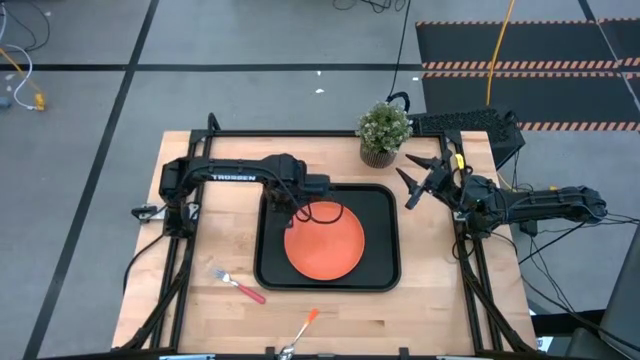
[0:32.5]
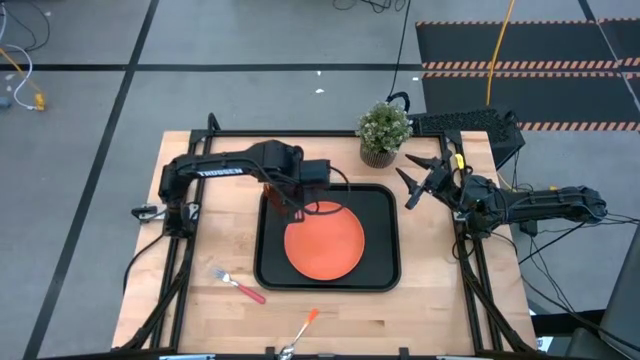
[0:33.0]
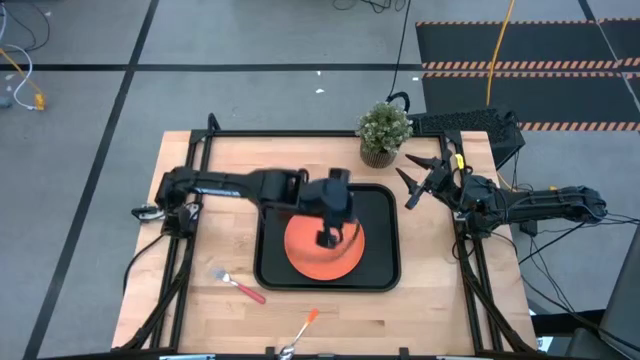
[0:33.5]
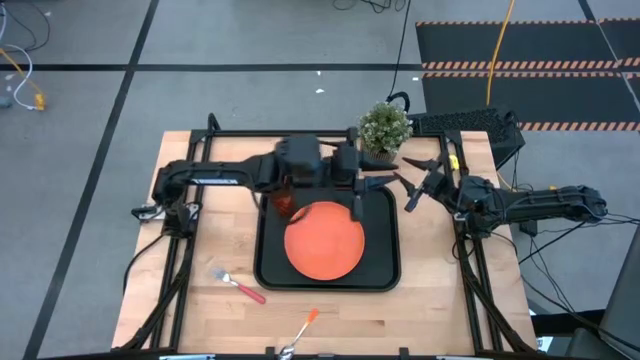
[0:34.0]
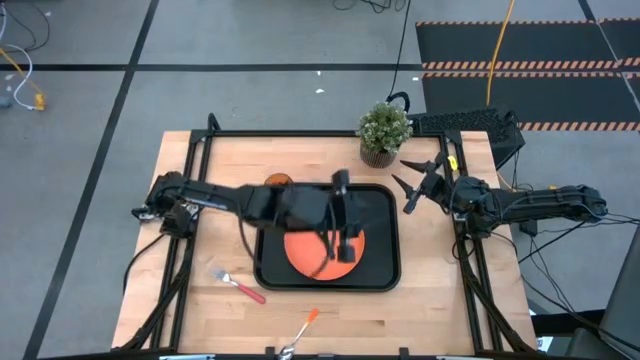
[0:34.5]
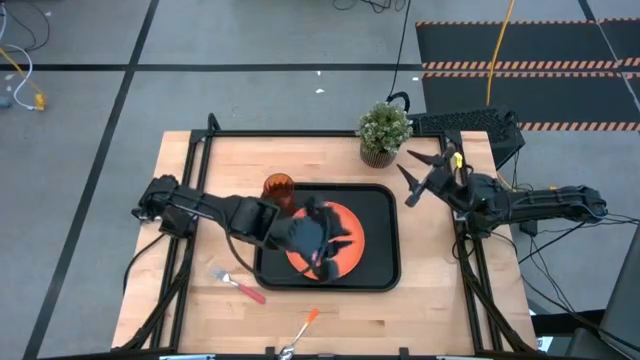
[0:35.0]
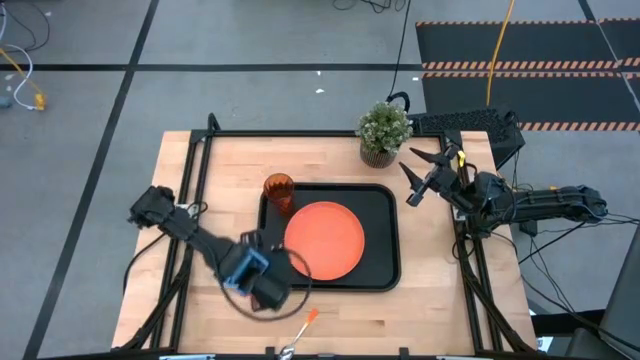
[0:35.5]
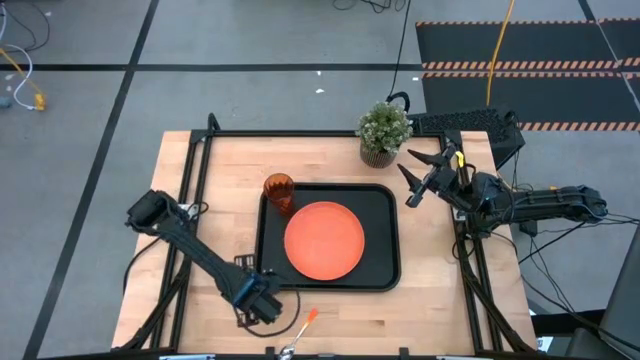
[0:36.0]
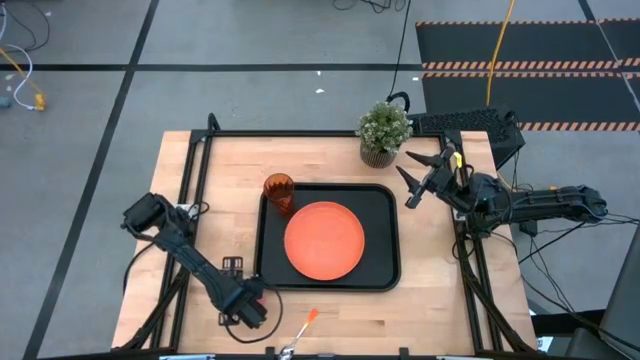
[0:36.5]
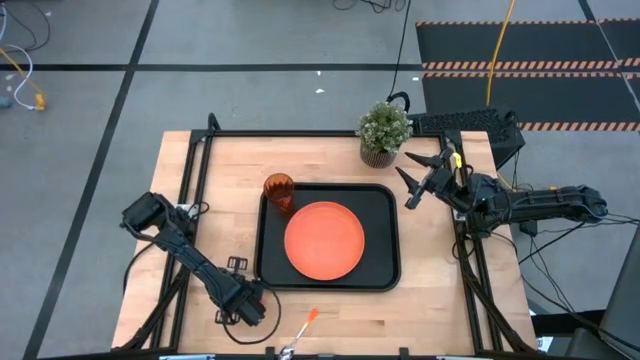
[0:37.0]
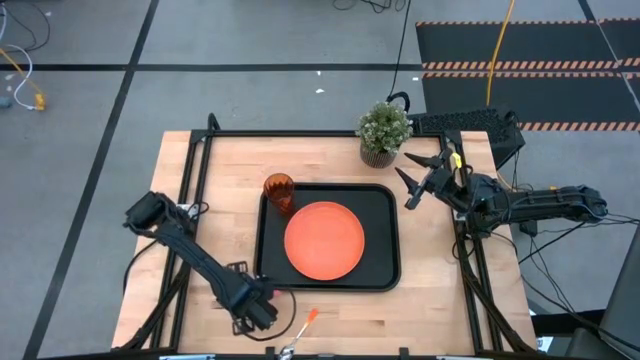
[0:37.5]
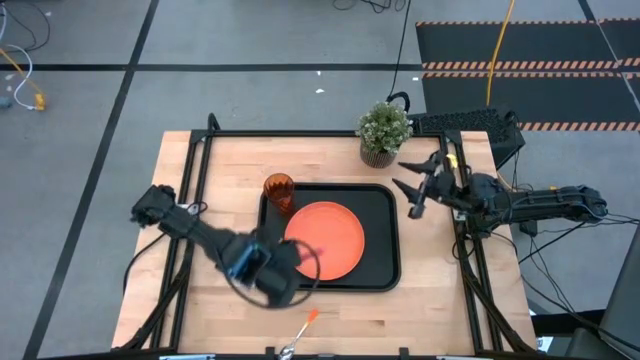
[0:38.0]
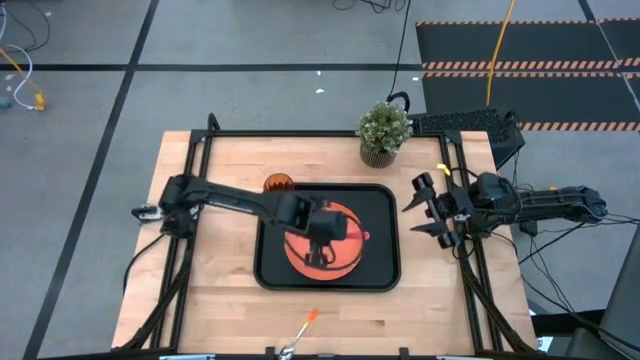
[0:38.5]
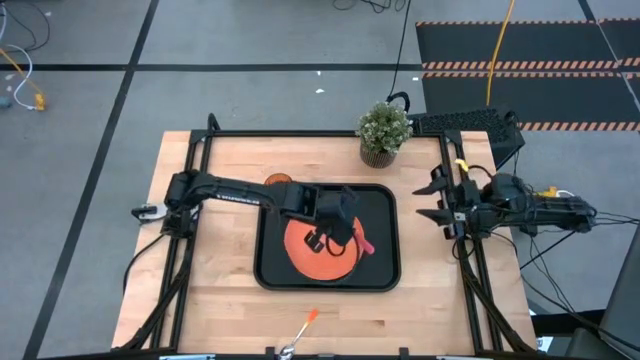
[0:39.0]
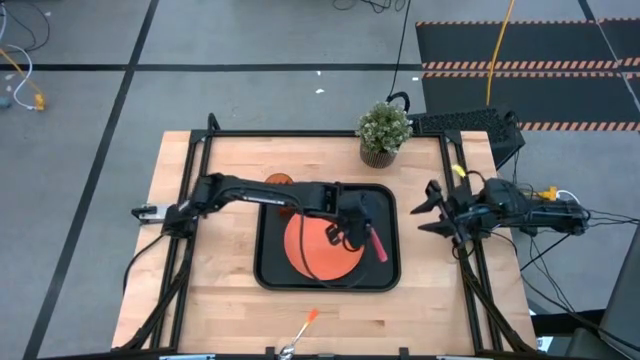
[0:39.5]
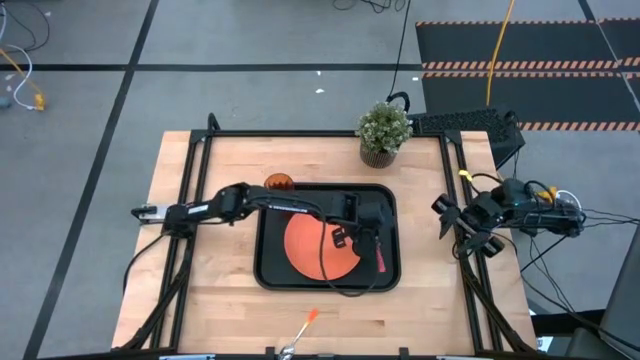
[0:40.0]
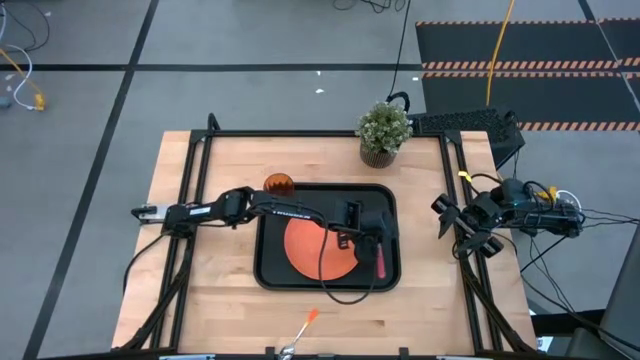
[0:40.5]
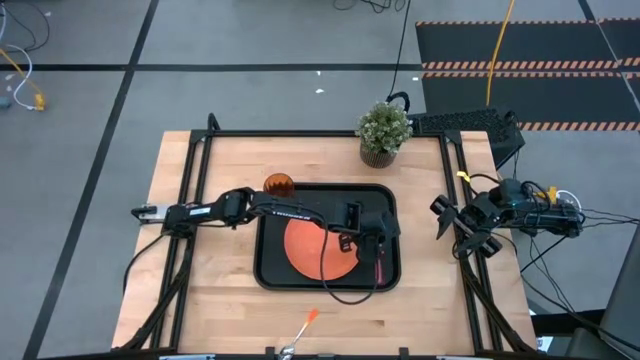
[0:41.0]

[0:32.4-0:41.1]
Task: Pick and place plate/cup/fork/spoon on tray
Put the pink fork on the black serving tray

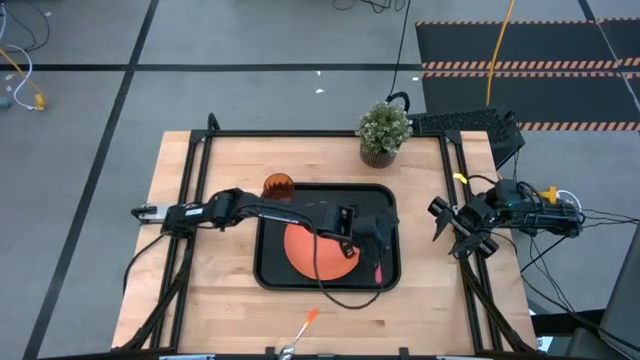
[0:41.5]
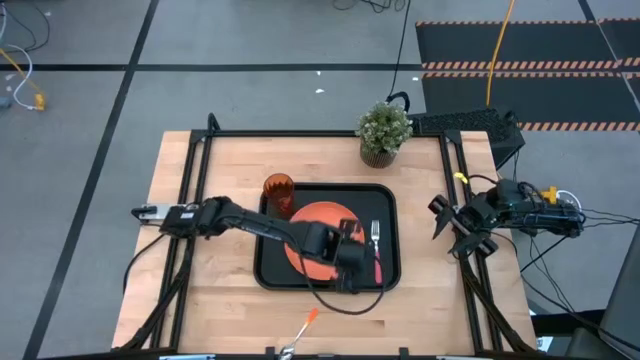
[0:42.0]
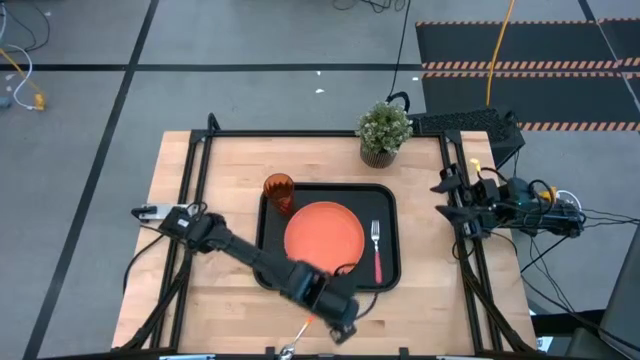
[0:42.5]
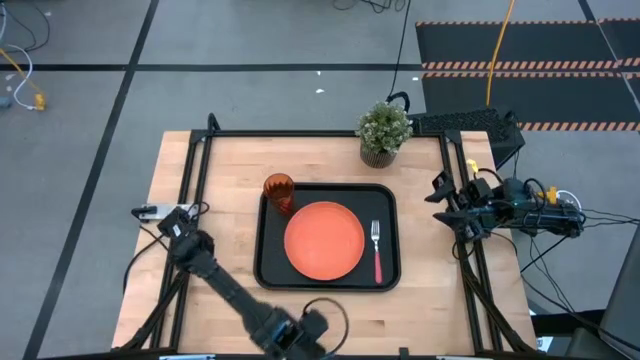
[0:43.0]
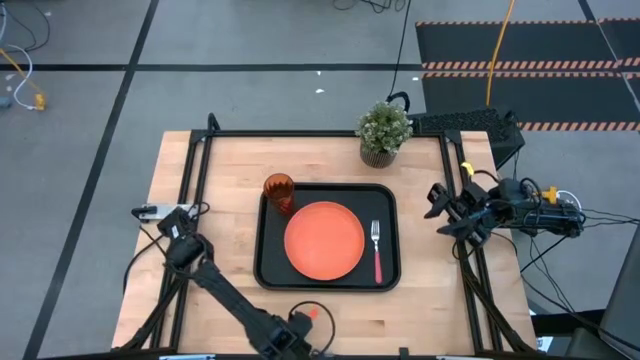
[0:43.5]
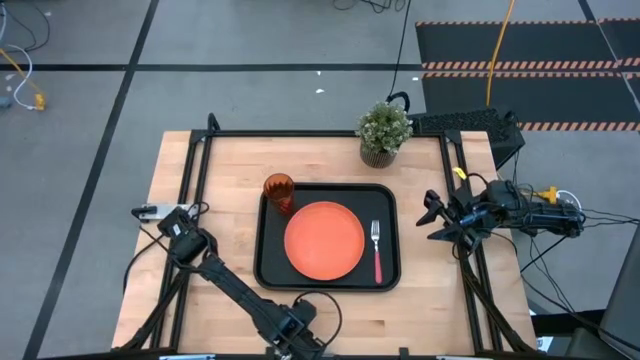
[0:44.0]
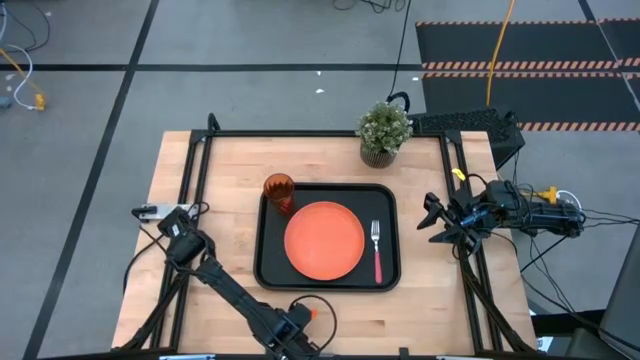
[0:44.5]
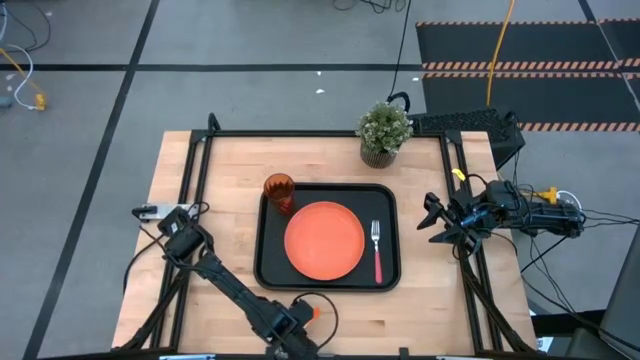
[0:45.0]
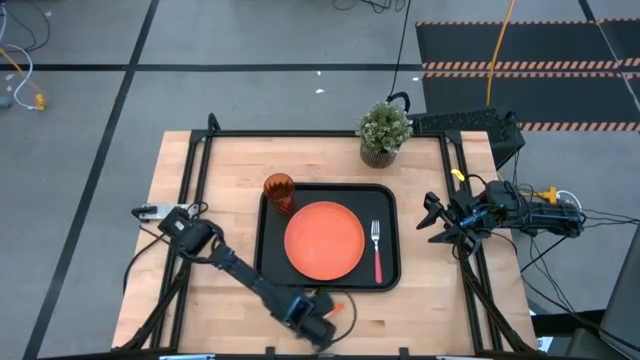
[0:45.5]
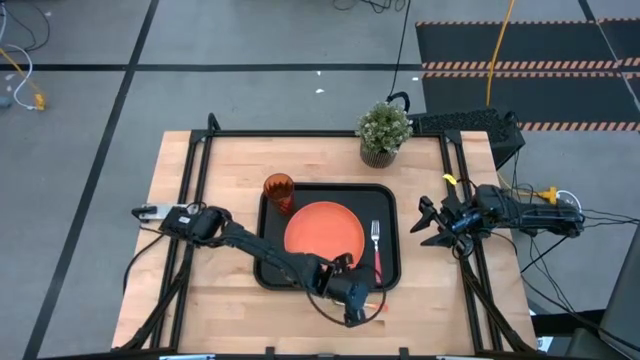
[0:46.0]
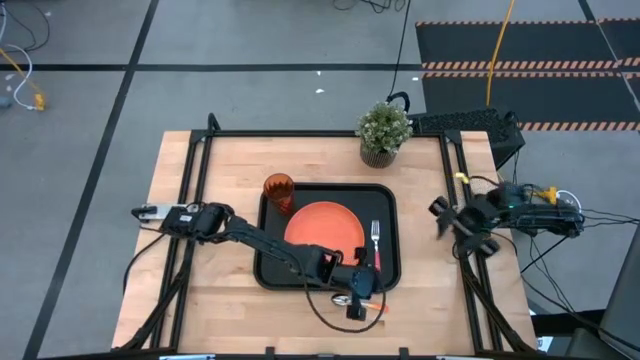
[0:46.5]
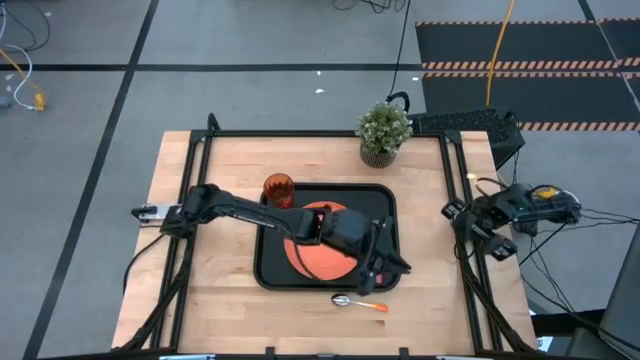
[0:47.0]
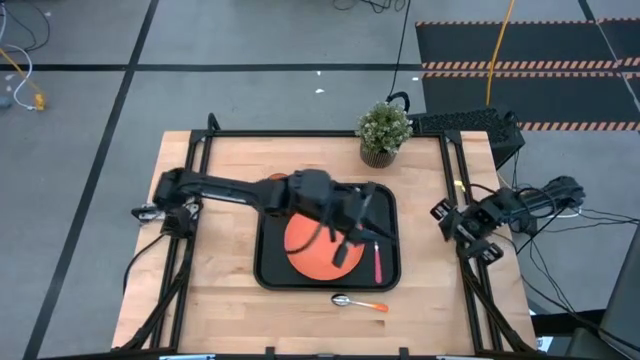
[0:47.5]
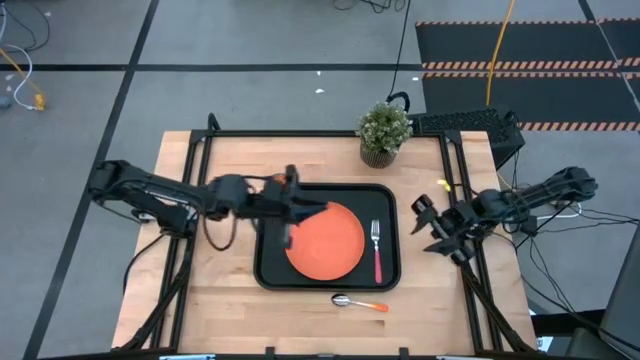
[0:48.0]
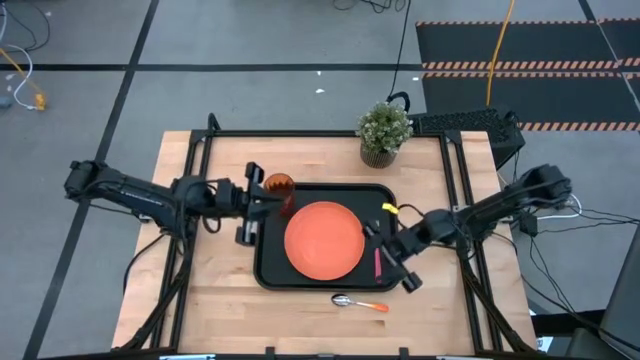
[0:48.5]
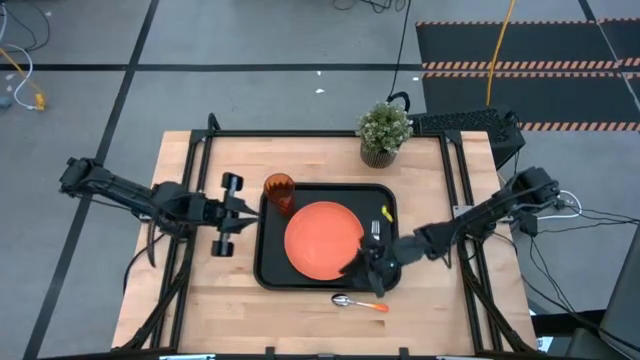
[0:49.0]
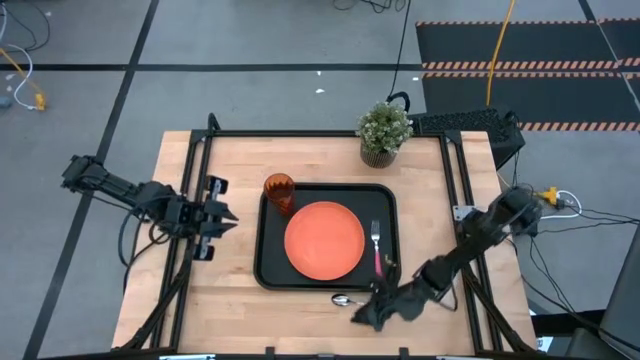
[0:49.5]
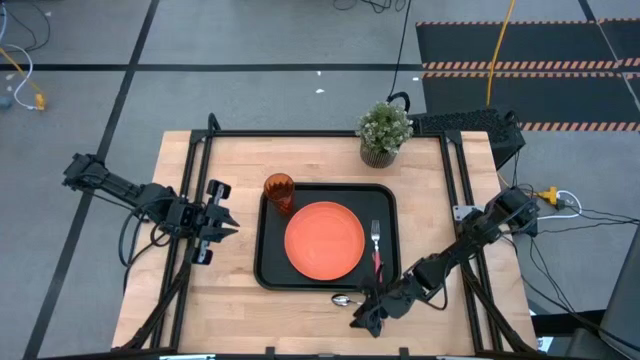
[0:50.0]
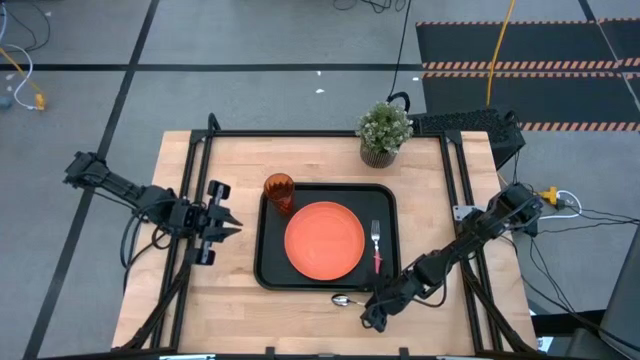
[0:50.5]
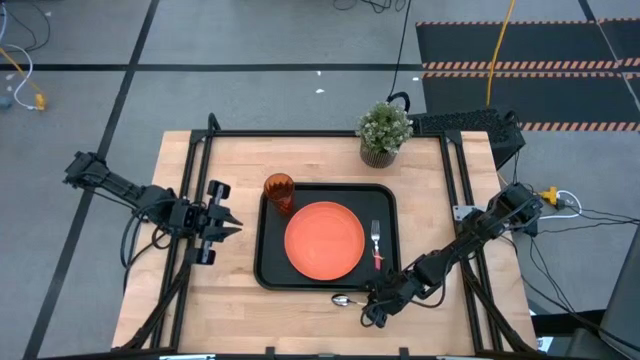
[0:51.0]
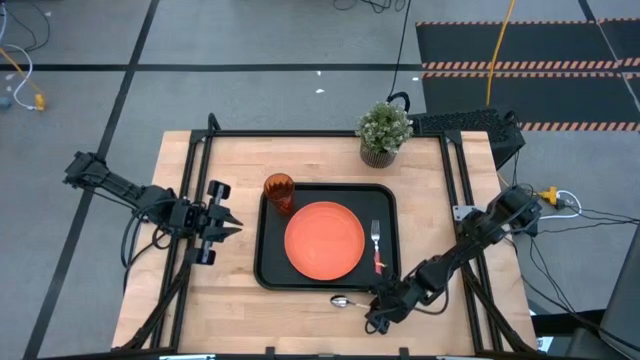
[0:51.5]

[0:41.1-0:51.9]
Put the orange spoon on the black serving tray

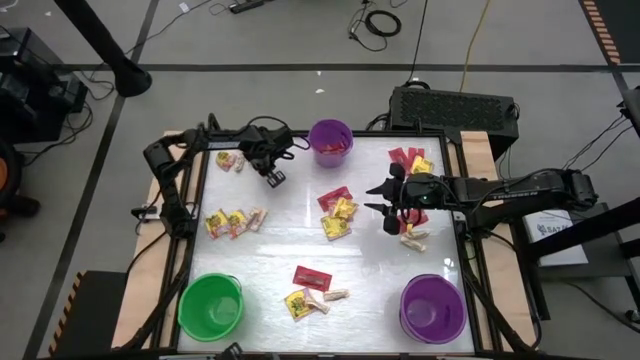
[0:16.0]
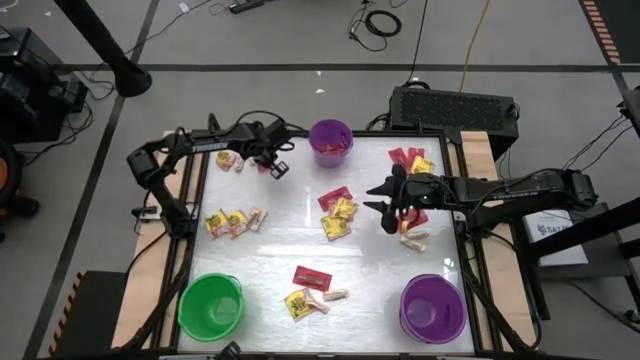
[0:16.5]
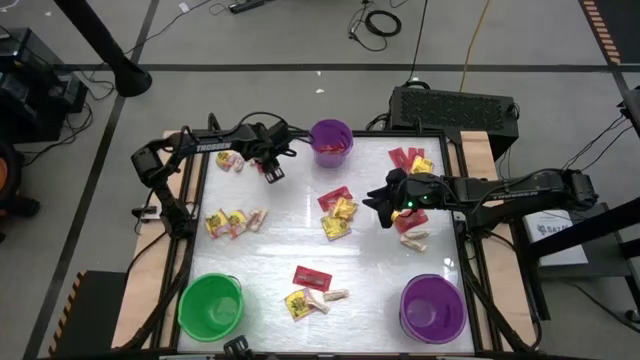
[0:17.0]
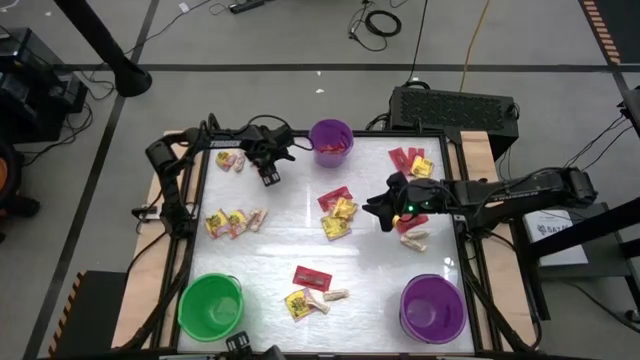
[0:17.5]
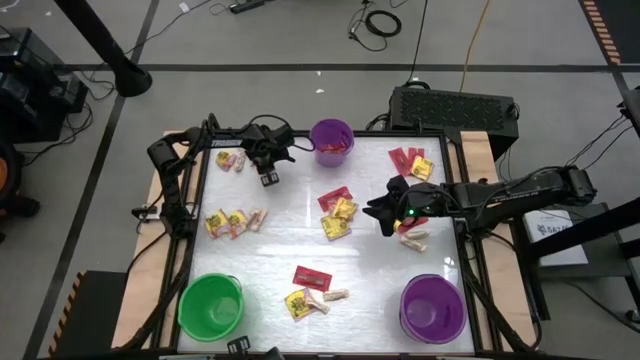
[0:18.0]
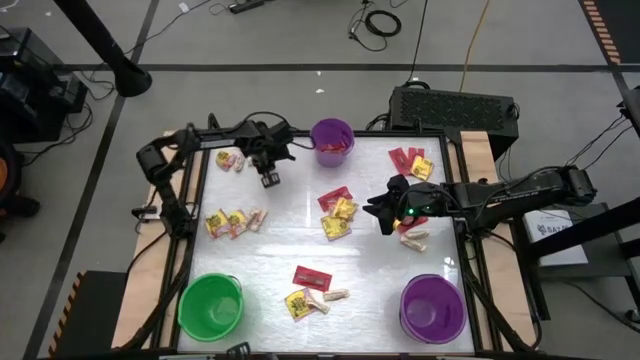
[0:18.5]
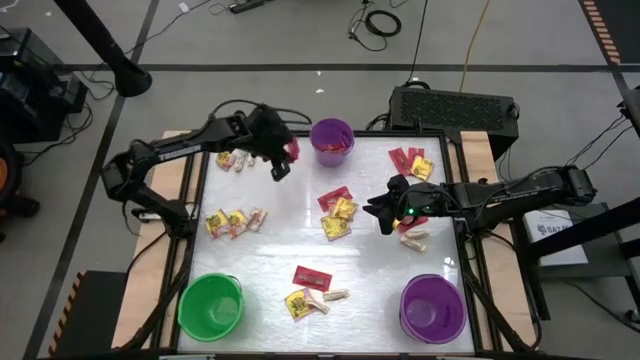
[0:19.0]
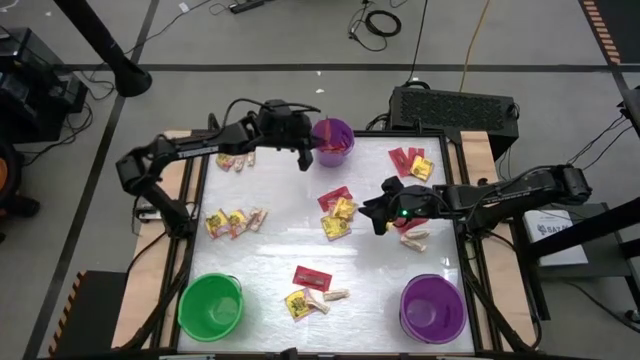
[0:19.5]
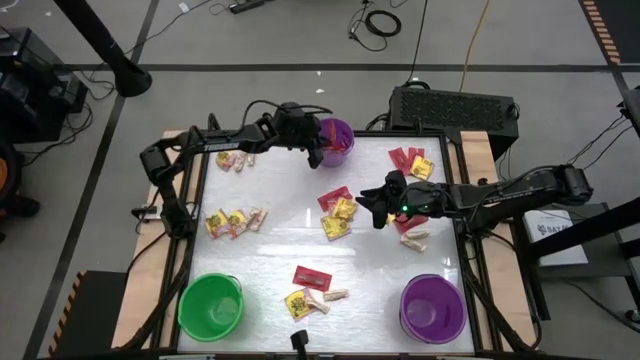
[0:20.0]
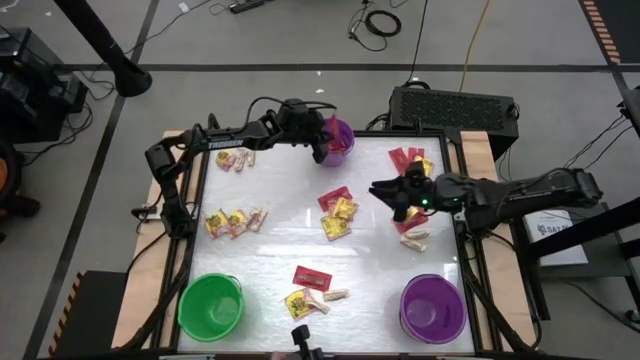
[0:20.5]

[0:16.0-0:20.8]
Task: Sort candy by brand, put in halloween buckets
Put the red candy into the top purple bucket
